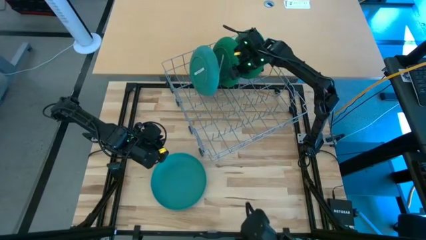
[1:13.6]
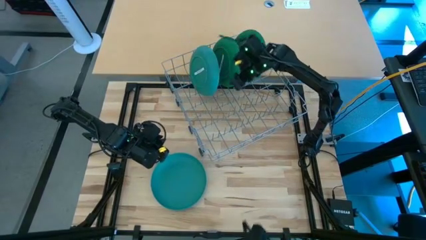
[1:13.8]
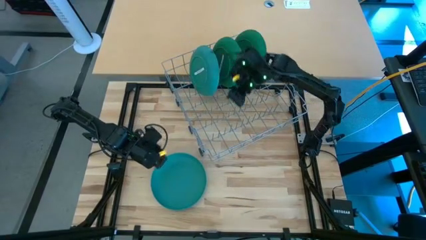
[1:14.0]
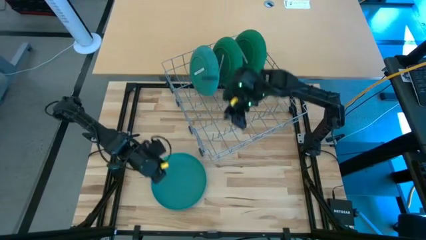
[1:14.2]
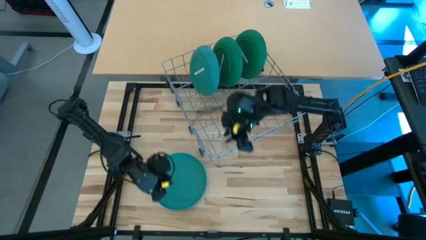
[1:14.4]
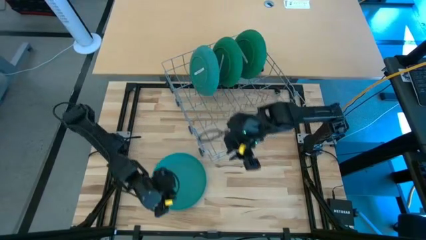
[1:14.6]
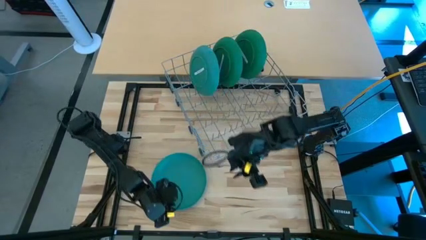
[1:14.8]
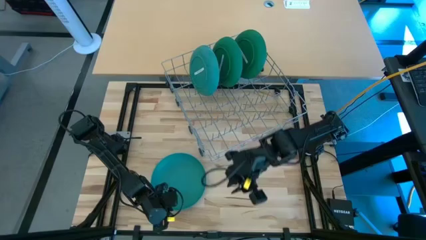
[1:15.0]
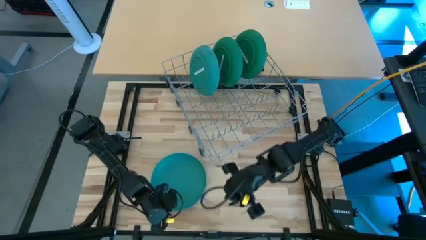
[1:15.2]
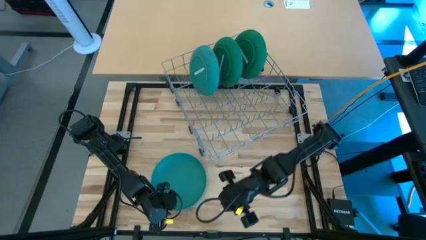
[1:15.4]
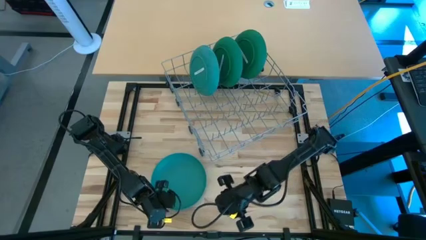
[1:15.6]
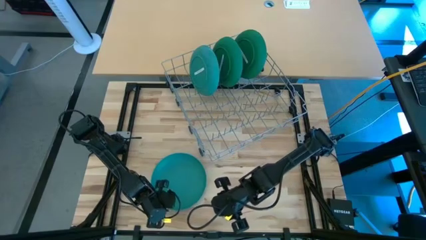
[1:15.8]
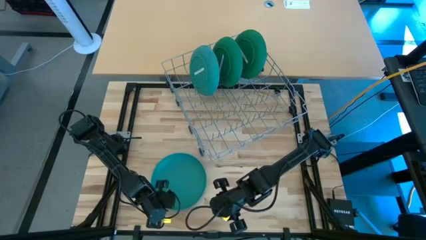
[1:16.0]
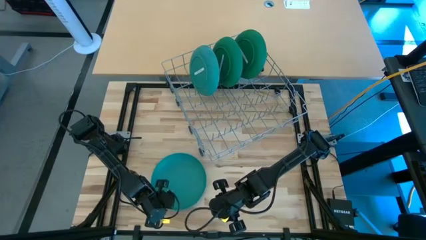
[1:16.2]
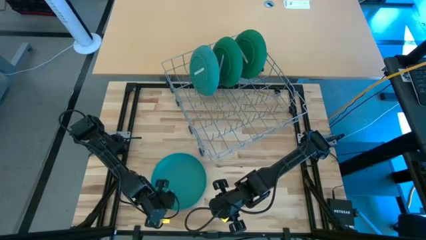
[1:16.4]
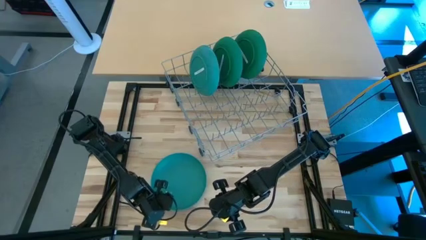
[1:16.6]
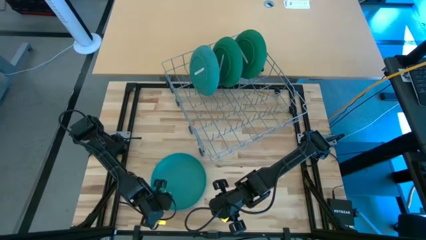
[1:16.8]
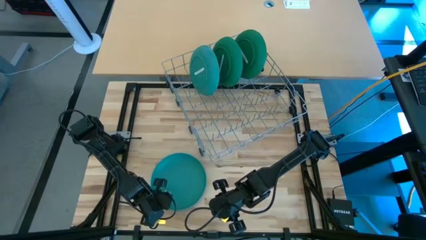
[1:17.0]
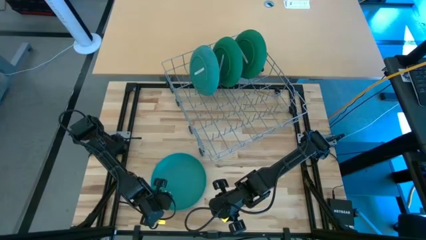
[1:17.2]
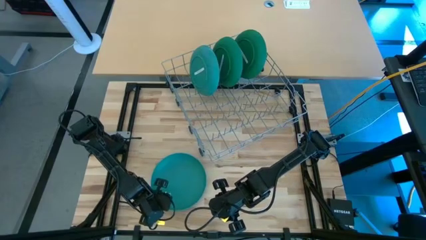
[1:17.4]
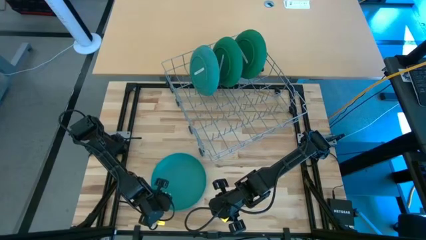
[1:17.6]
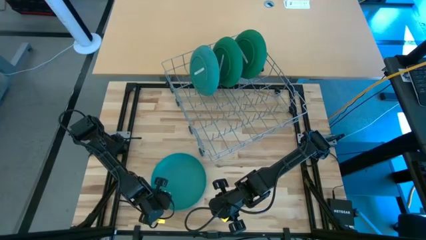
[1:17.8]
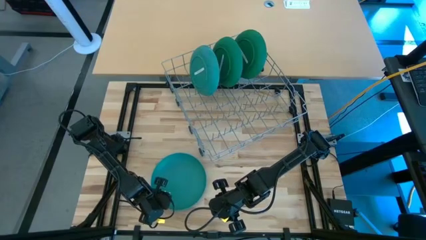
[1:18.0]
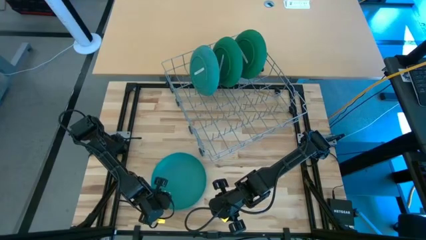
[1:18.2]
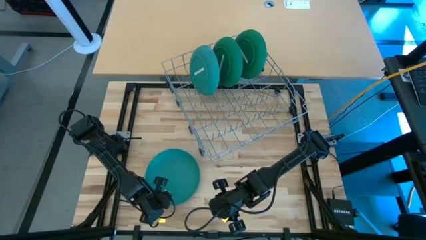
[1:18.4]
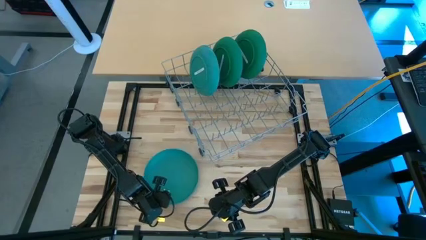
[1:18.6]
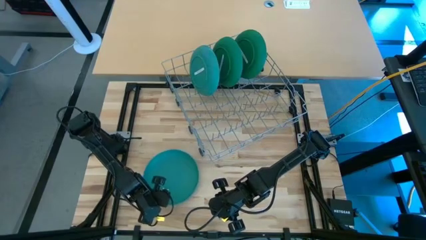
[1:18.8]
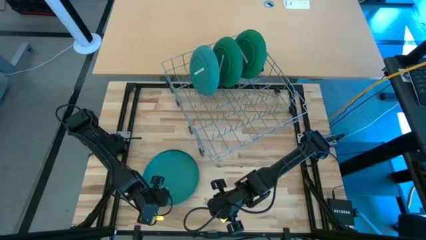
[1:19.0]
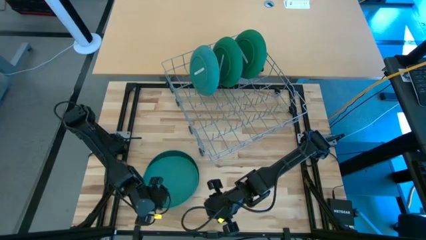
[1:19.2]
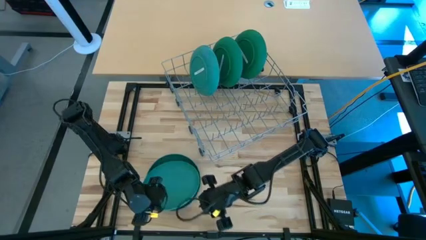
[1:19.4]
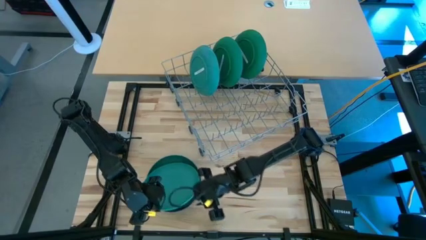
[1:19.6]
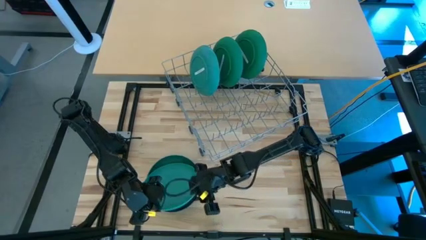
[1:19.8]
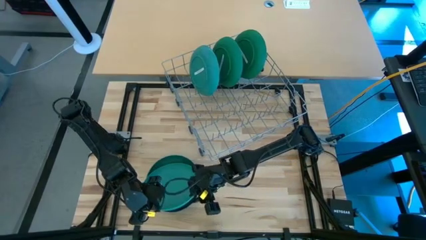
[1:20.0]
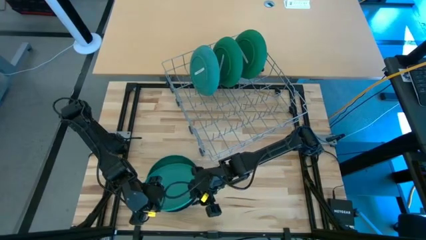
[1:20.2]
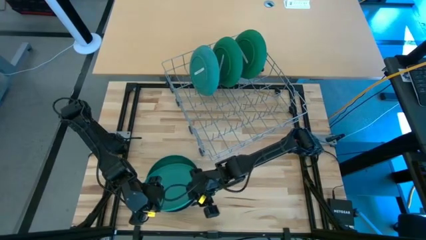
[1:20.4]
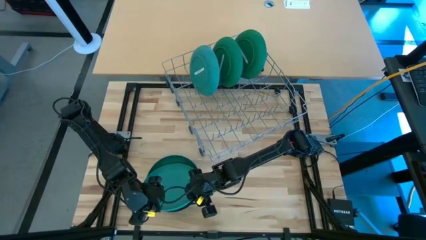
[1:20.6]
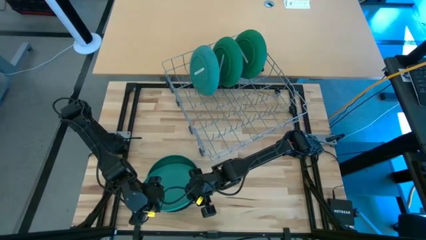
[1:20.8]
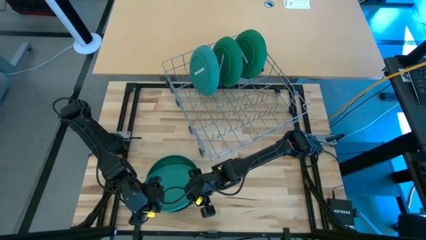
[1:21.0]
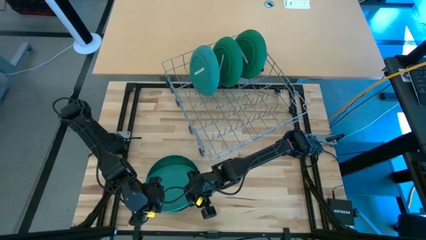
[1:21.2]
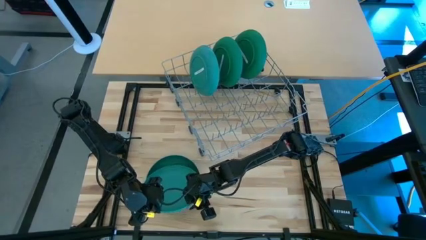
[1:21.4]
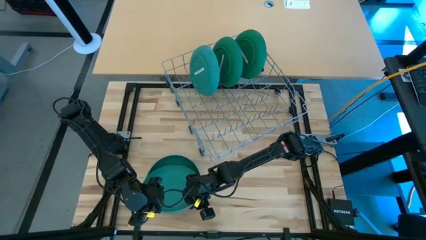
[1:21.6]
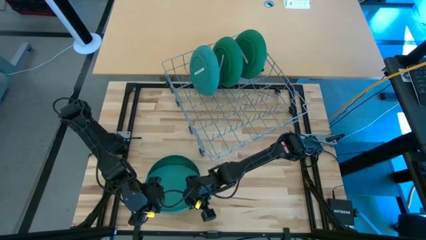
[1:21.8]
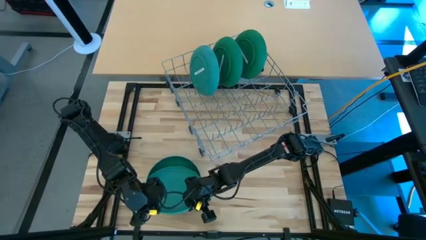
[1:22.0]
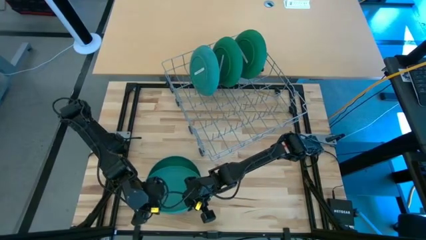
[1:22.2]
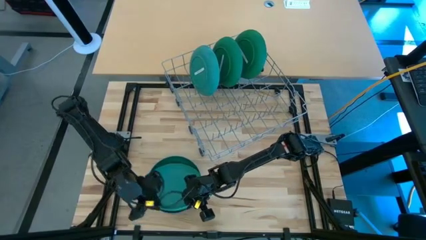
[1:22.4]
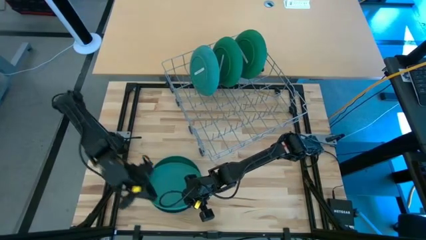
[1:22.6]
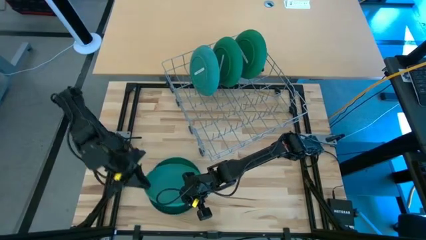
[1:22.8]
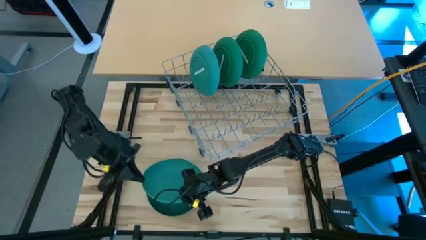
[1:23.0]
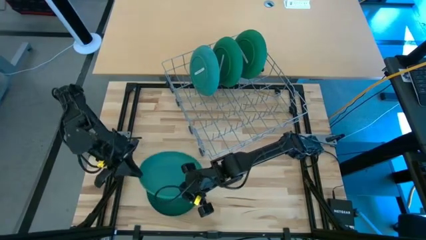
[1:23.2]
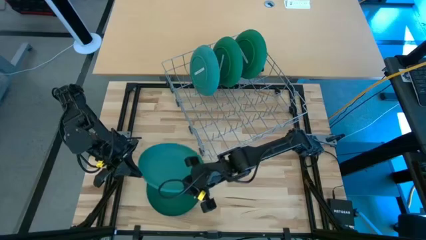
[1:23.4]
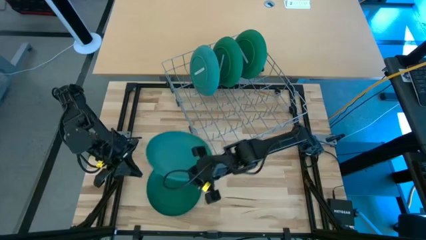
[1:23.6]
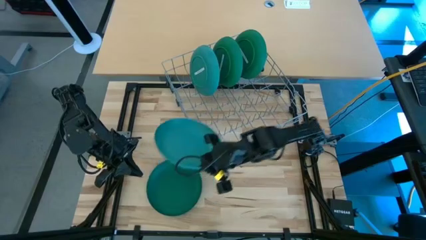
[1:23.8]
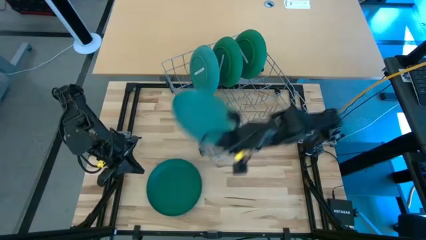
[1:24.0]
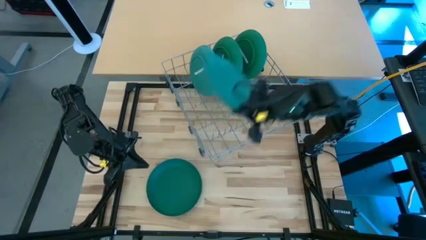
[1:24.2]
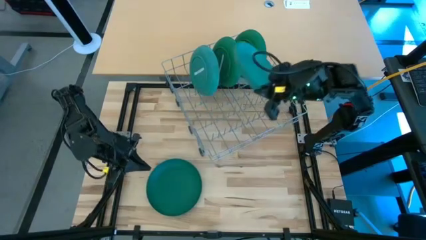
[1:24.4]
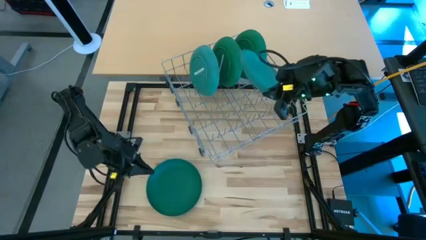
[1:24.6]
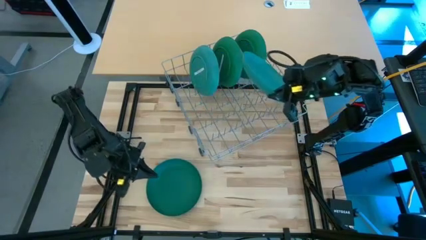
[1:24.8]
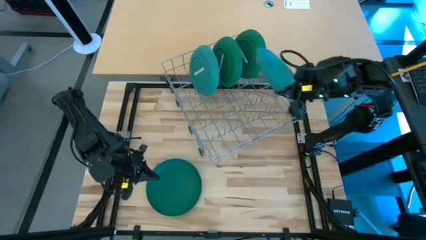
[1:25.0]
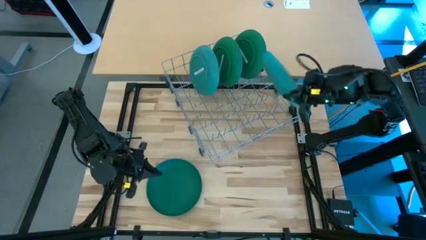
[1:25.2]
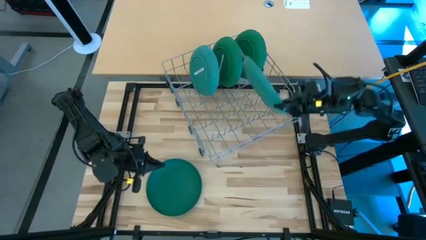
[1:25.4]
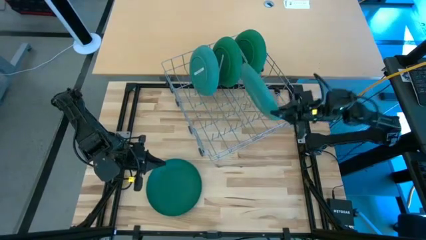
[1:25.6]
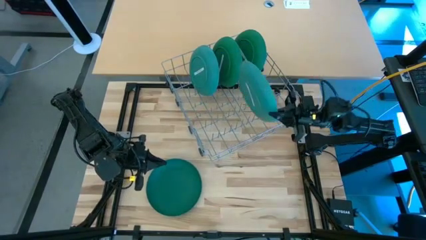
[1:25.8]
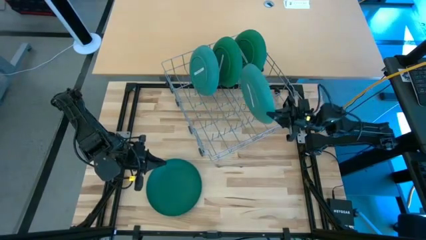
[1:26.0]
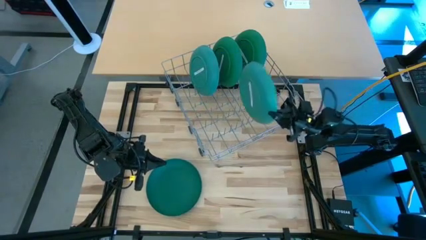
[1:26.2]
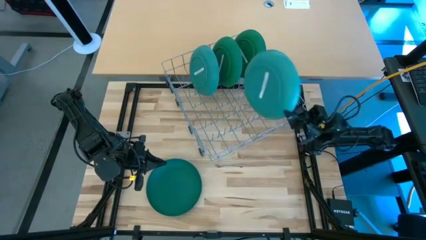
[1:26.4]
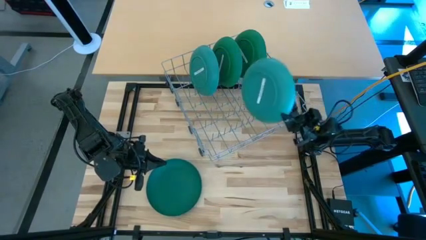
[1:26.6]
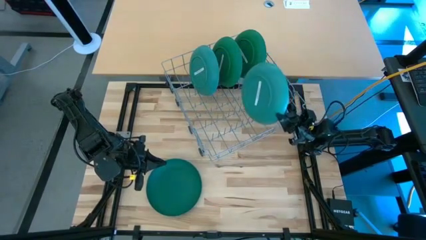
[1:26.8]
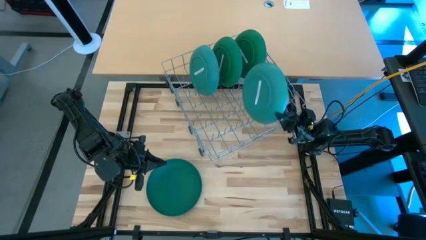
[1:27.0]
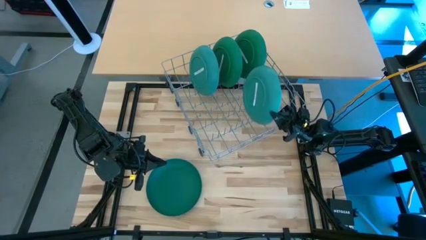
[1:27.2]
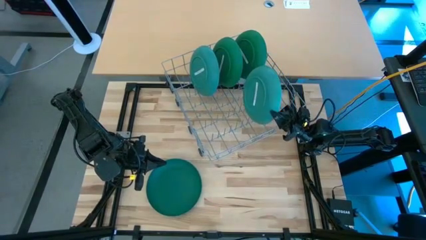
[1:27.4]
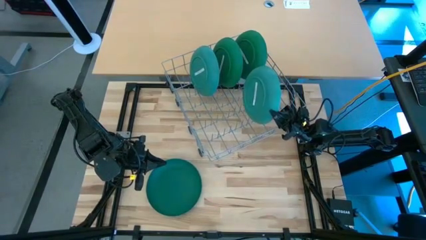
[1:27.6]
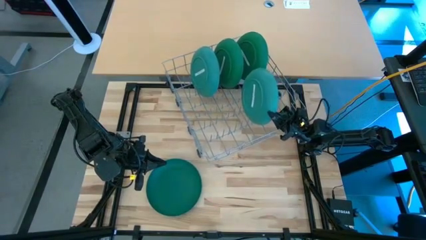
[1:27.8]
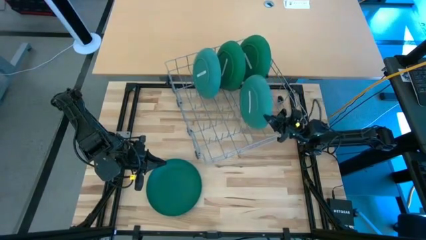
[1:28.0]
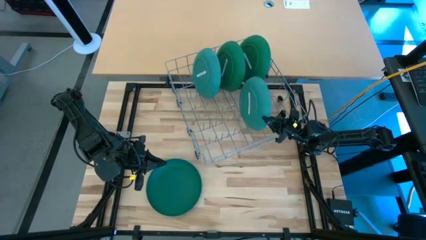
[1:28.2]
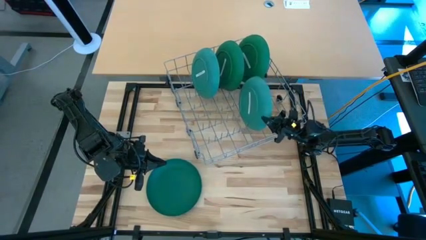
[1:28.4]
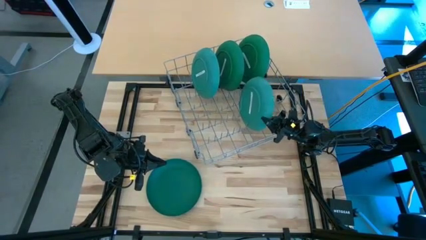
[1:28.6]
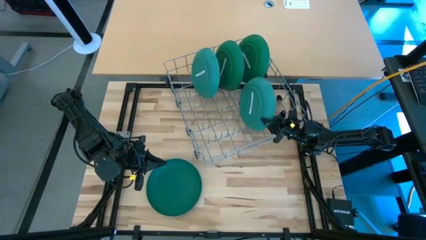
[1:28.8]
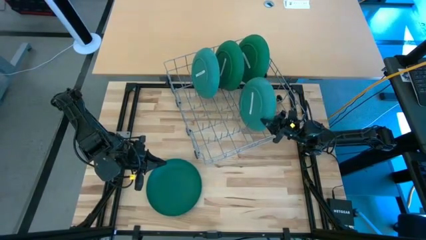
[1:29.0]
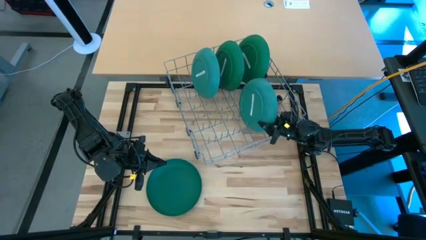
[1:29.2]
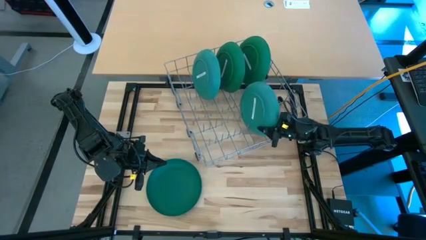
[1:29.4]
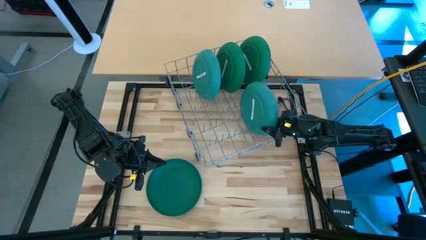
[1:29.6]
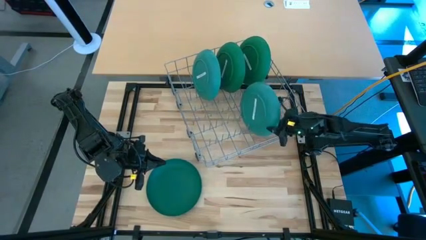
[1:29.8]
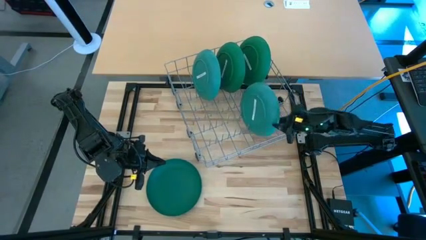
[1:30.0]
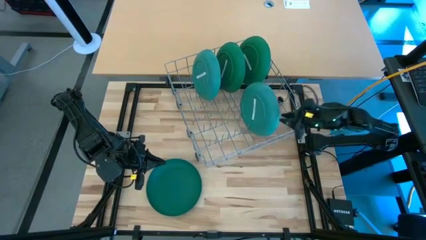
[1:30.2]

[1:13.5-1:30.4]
Task: Sort dishes
Put the light green plate in the dish rack
